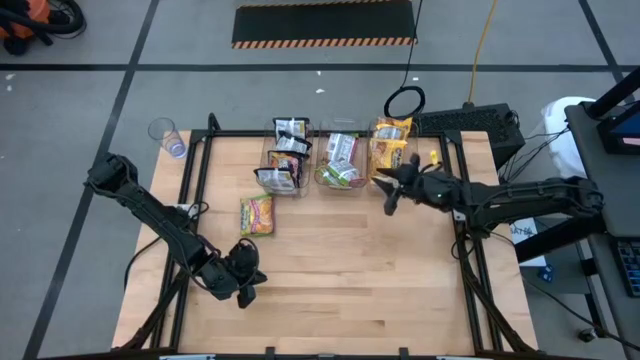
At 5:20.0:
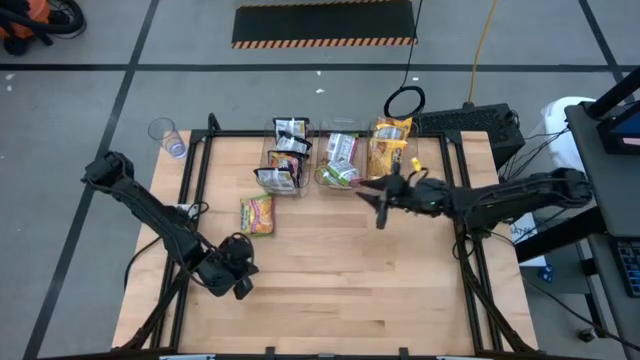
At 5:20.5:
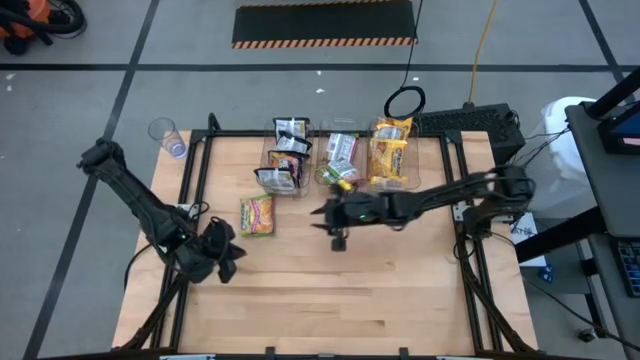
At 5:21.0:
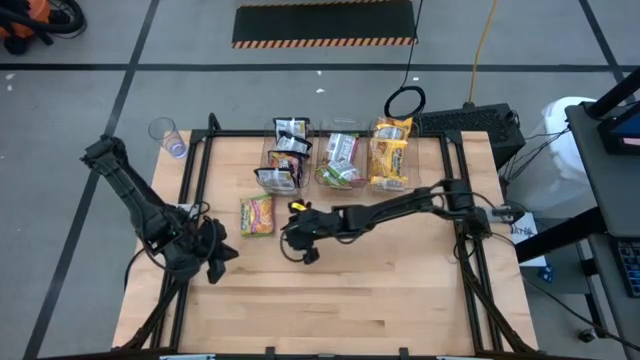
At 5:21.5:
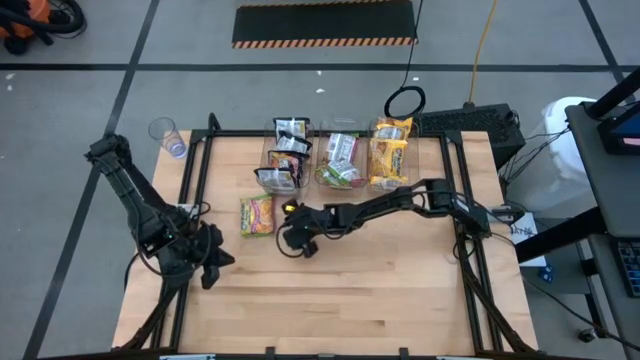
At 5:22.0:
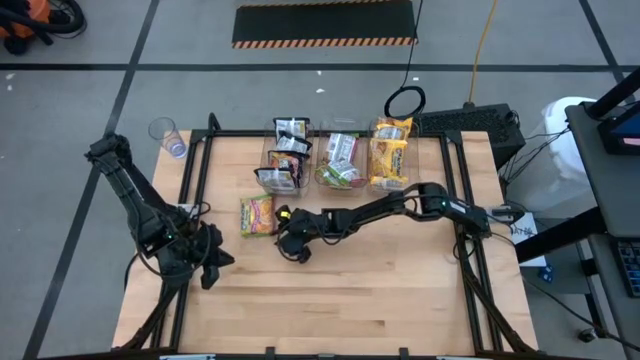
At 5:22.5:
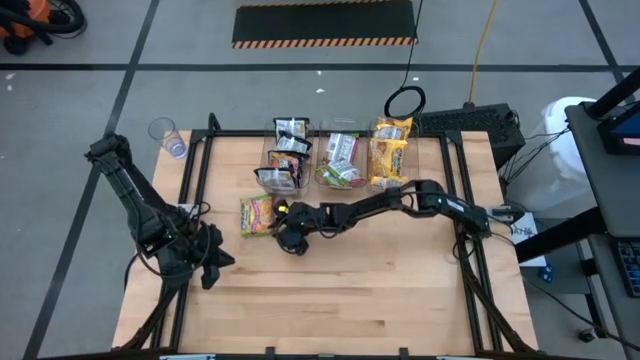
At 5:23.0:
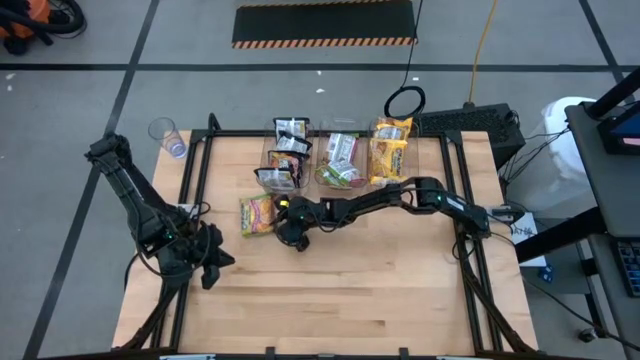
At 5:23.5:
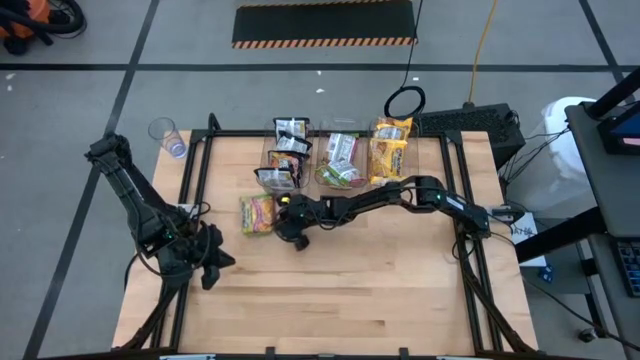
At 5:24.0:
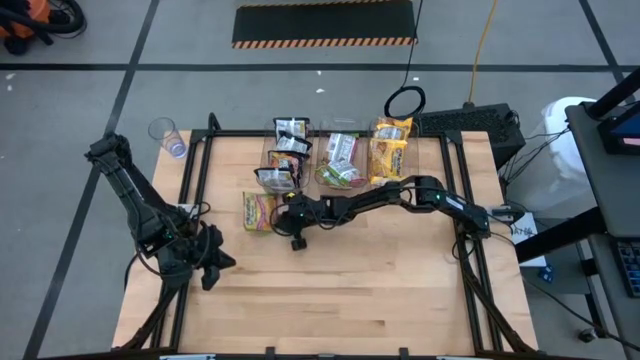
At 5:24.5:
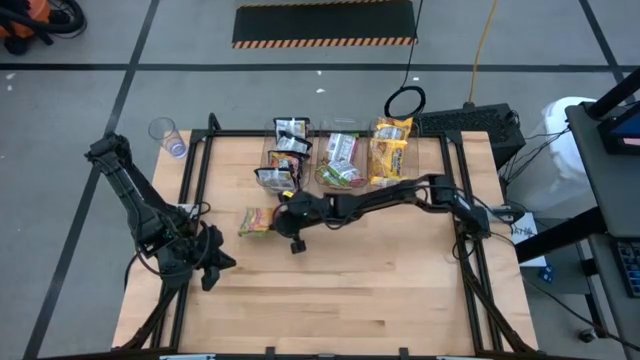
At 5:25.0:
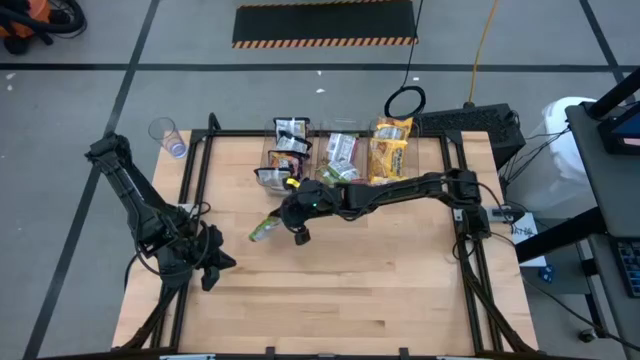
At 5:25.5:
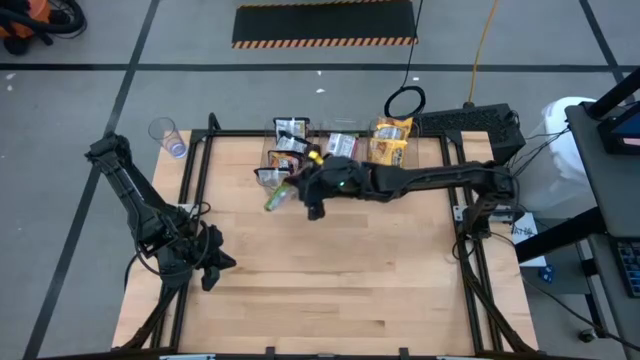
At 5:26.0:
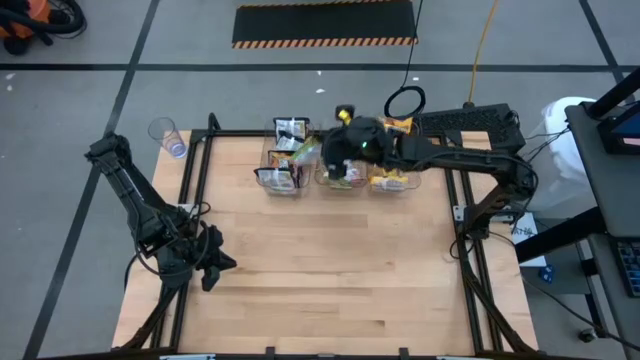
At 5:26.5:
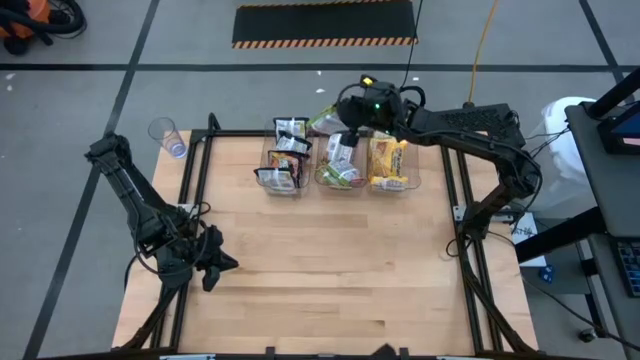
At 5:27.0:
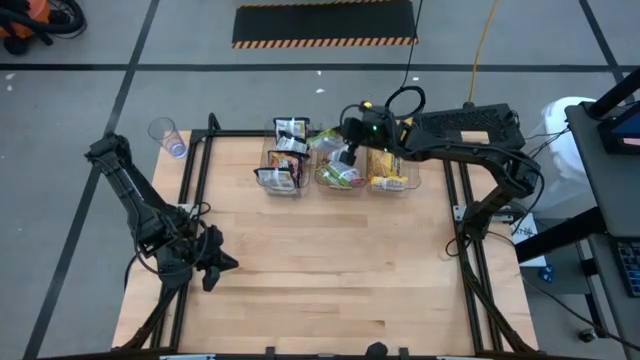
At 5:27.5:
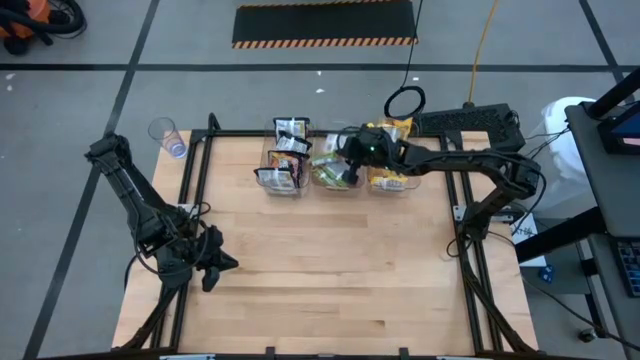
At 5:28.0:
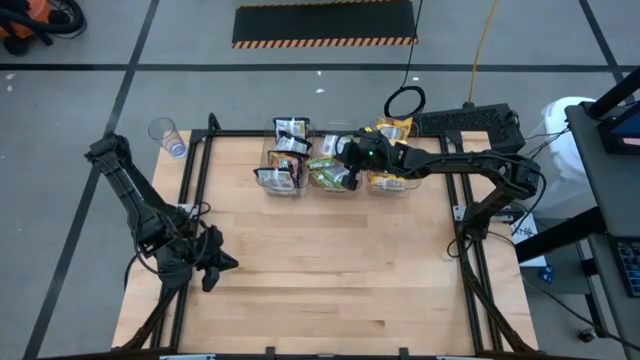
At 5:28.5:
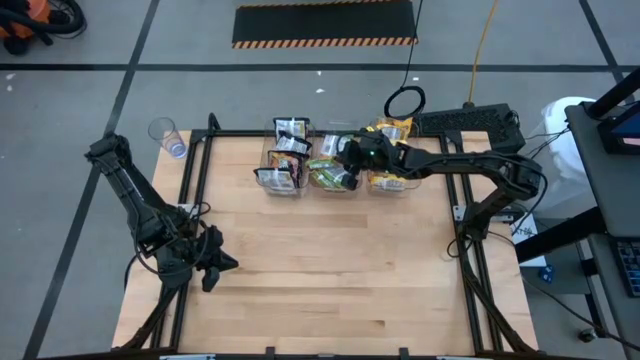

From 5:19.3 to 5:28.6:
Task: Sort Maruchan noodles
Put the green noodle pack into the center transparent bin

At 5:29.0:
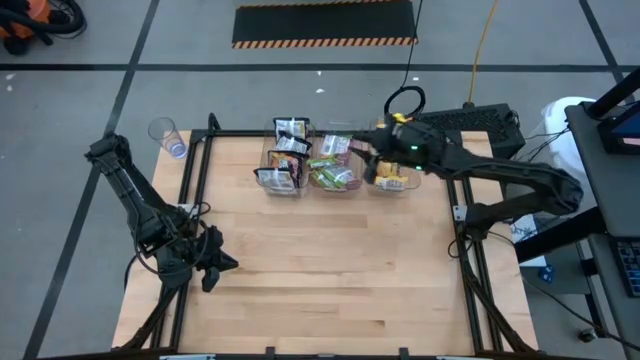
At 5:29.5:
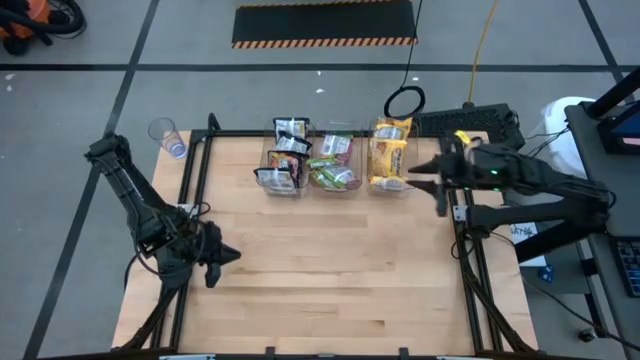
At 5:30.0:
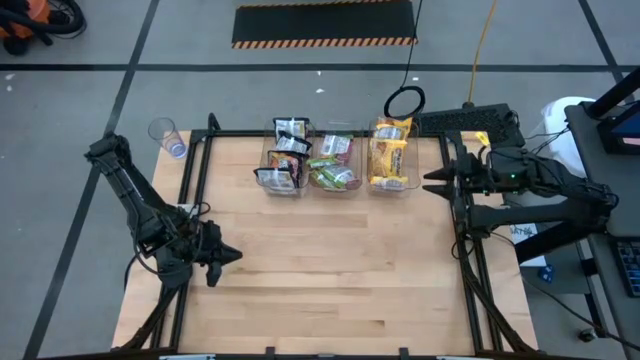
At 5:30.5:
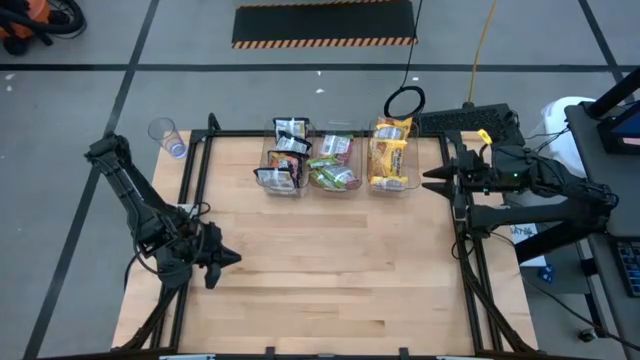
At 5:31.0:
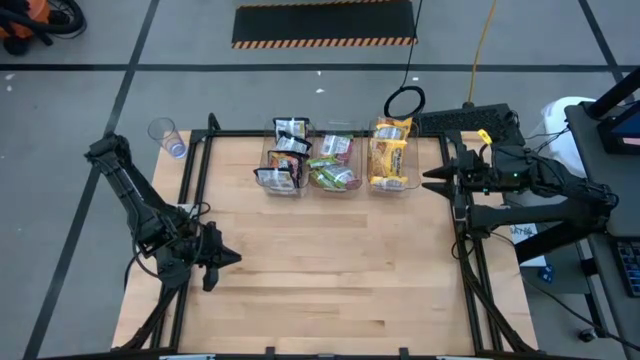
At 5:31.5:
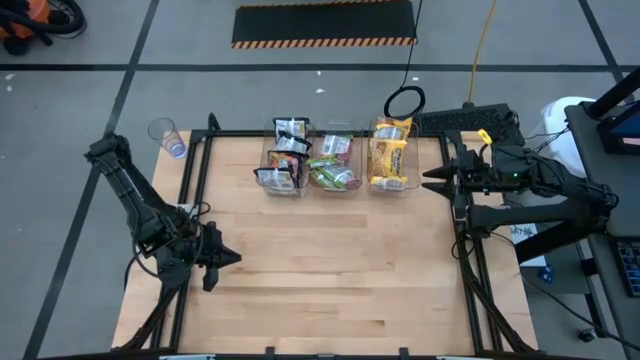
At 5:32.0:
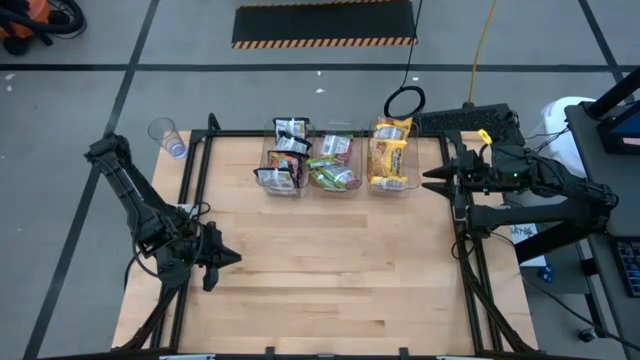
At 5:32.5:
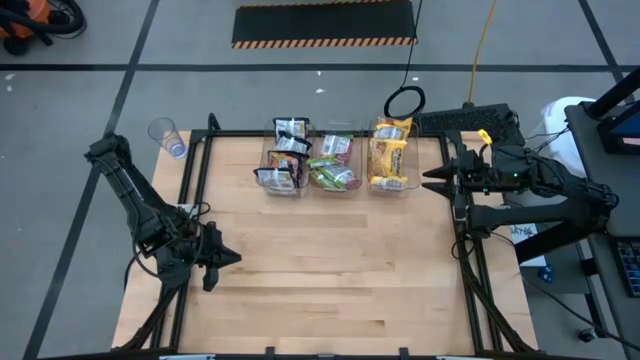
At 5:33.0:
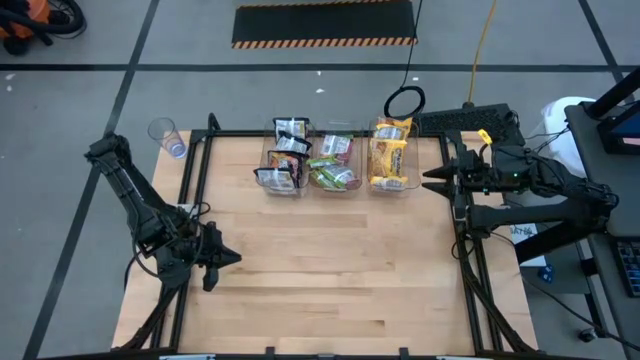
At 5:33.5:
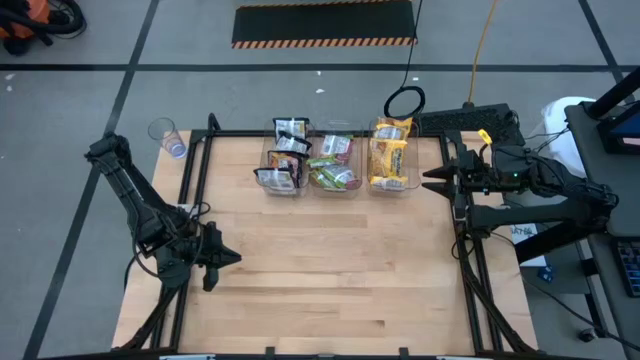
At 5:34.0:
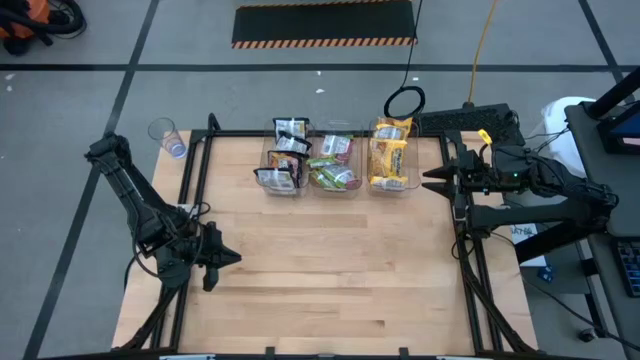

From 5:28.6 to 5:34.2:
Return to Home Position

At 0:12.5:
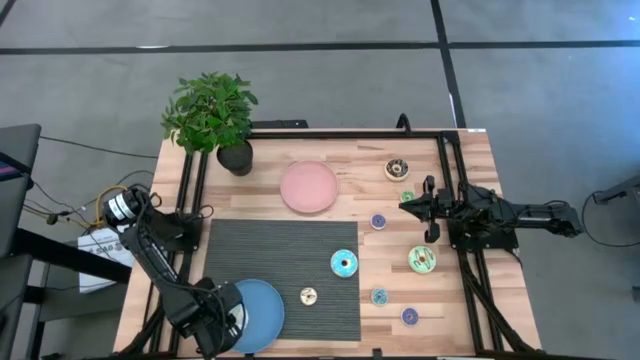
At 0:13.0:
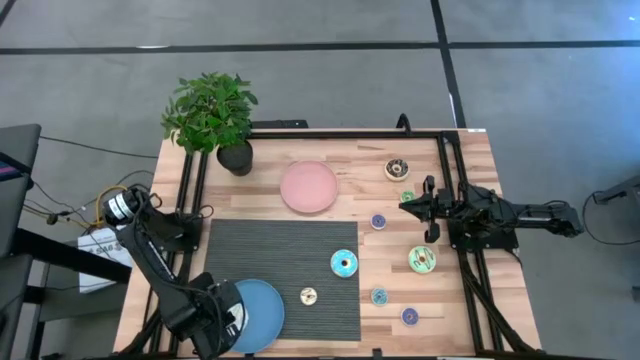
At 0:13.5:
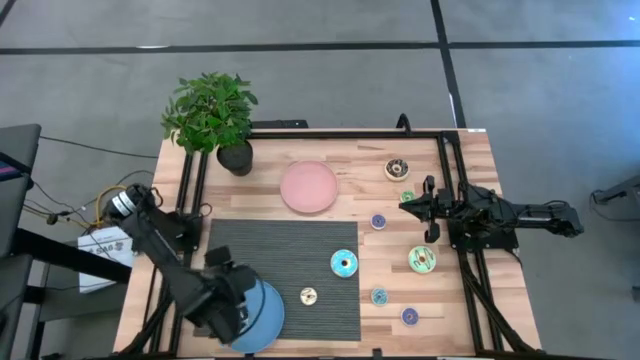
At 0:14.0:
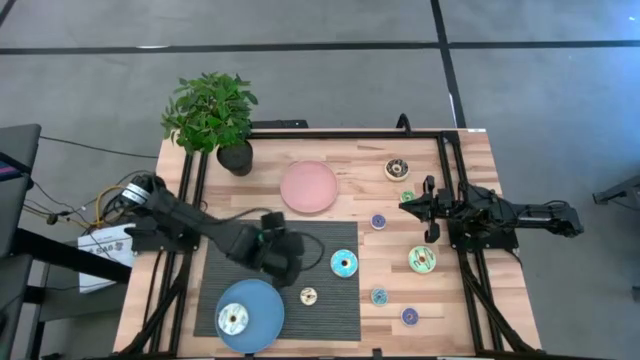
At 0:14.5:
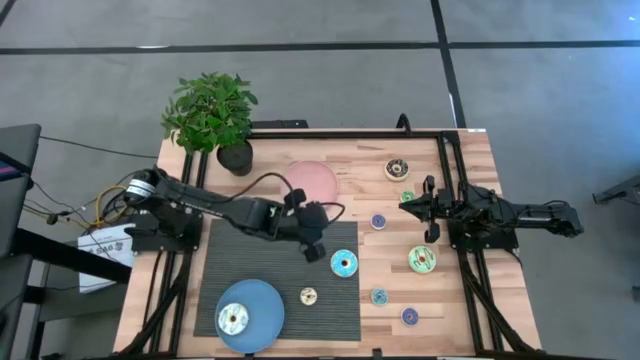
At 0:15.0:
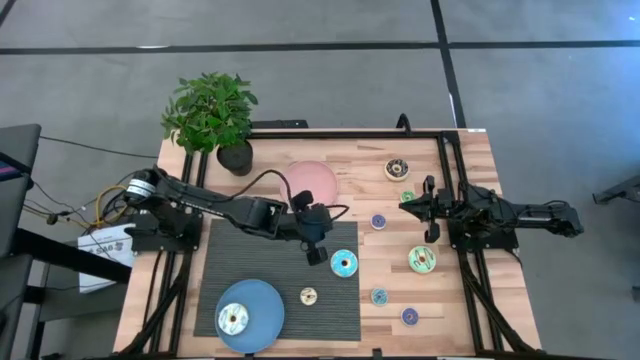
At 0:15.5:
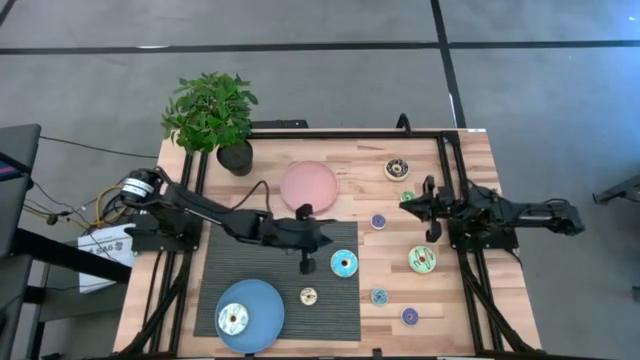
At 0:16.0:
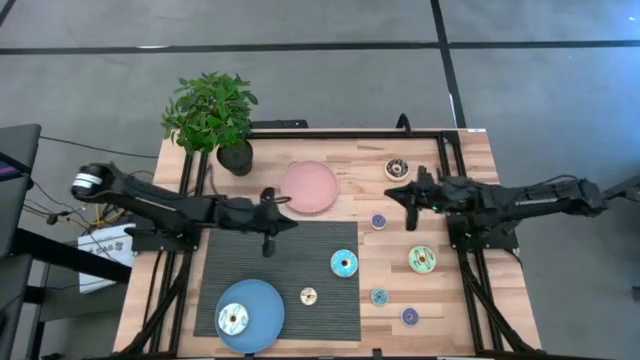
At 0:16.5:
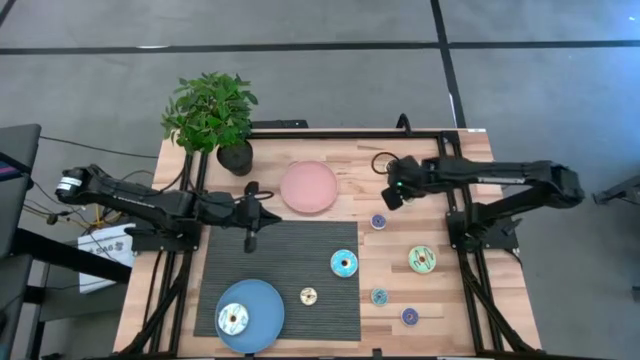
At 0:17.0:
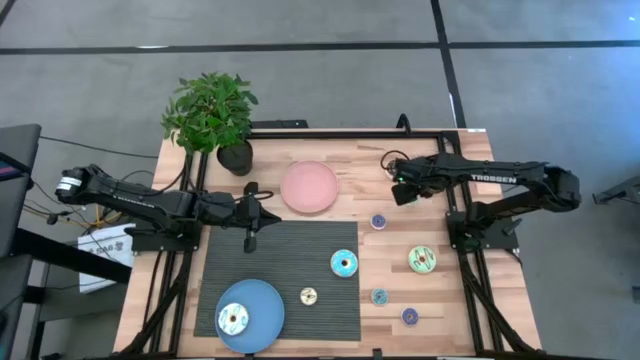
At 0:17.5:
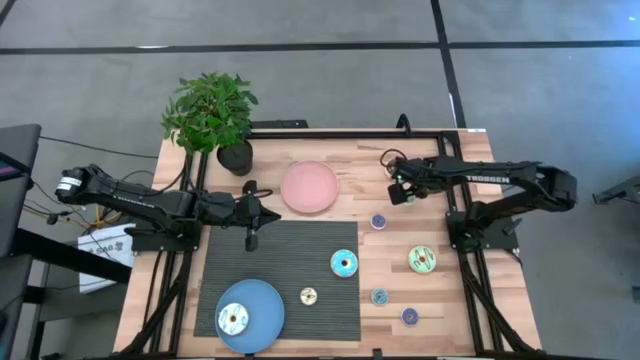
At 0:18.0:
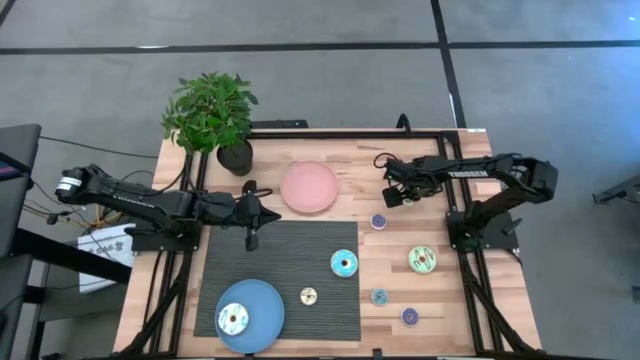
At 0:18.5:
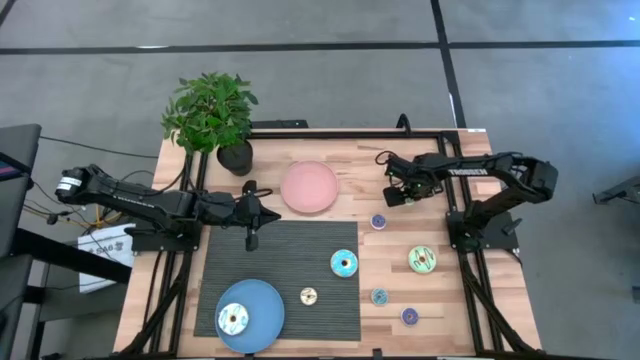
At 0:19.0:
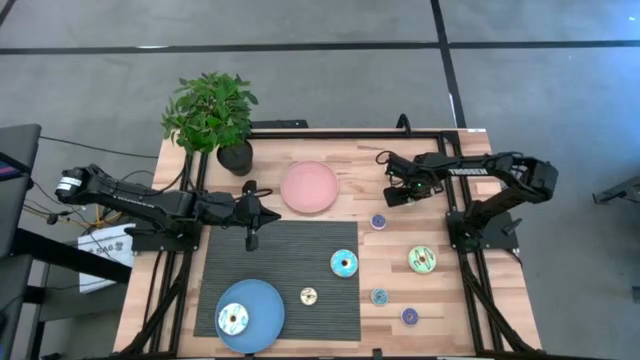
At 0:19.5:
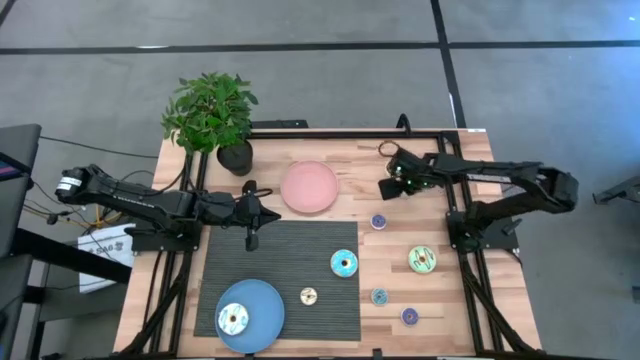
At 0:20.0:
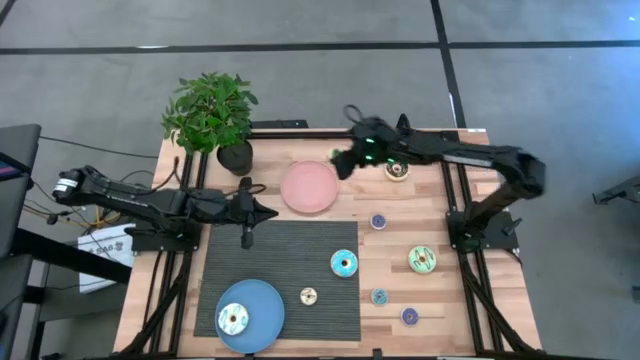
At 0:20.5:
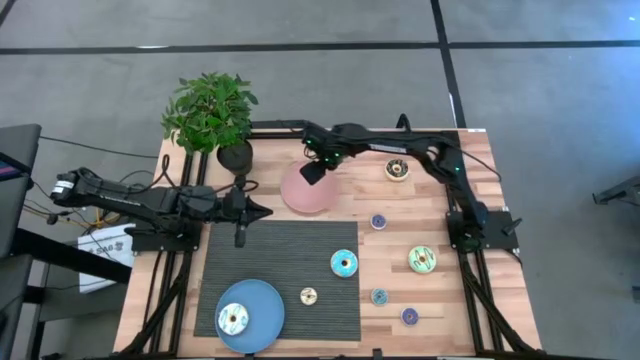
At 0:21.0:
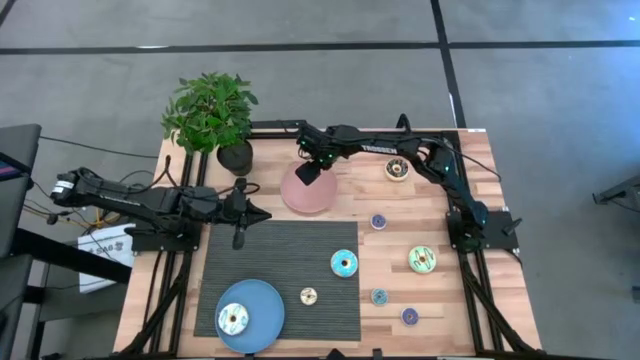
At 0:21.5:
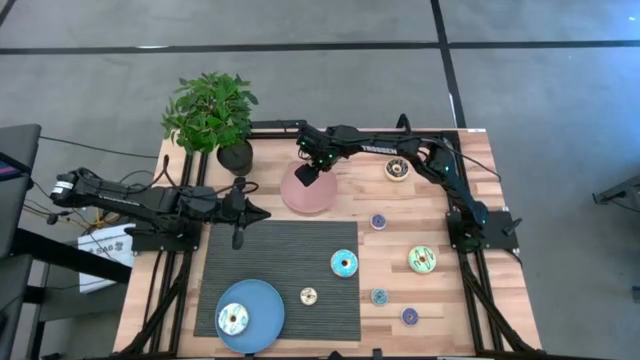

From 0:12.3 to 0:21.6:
Task: Pick & Place donuts
Put the small green donut on the pink plate
